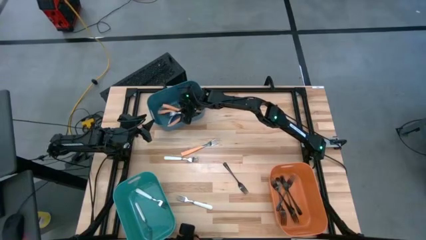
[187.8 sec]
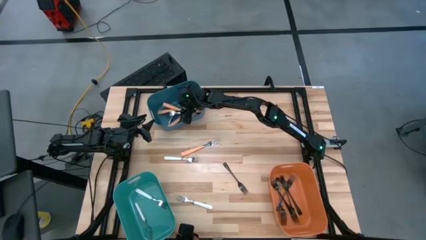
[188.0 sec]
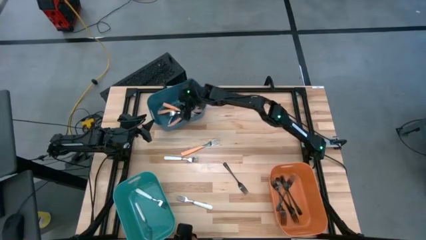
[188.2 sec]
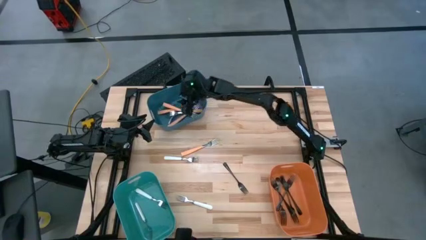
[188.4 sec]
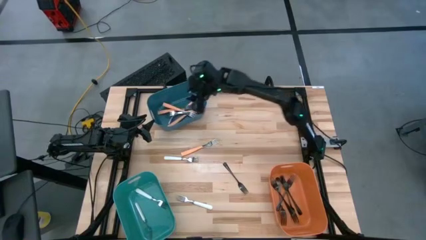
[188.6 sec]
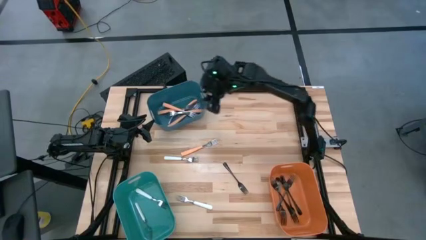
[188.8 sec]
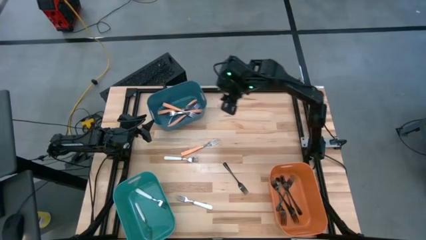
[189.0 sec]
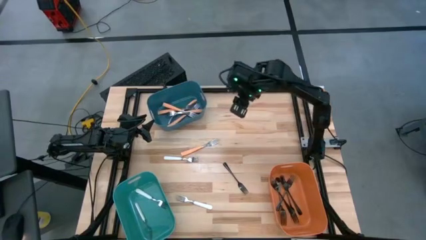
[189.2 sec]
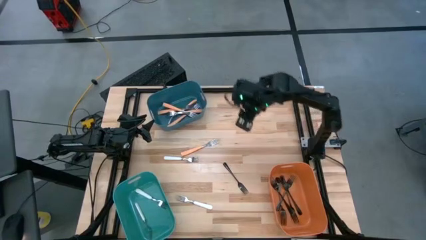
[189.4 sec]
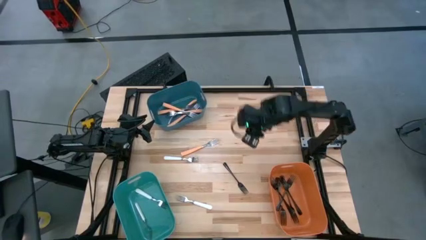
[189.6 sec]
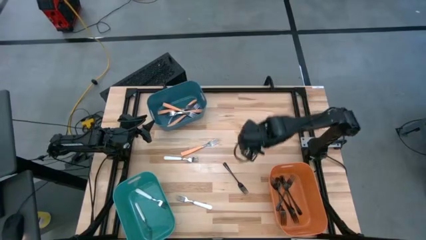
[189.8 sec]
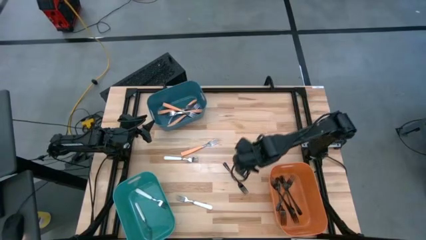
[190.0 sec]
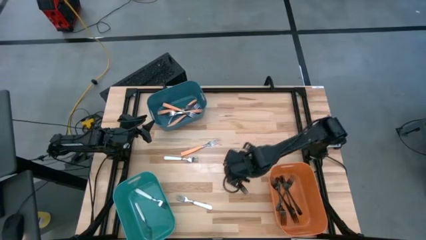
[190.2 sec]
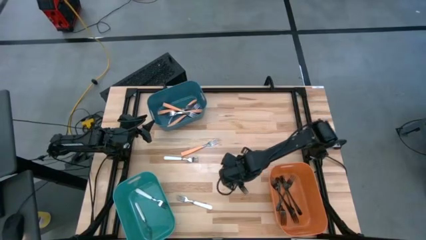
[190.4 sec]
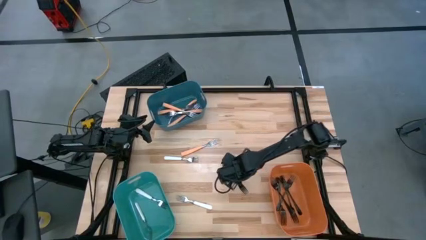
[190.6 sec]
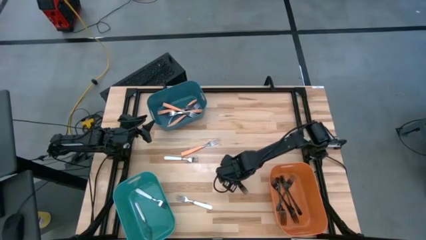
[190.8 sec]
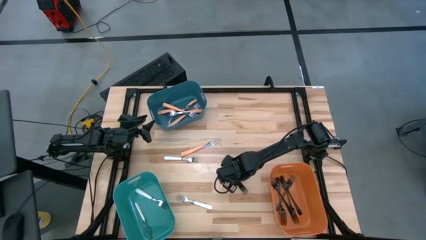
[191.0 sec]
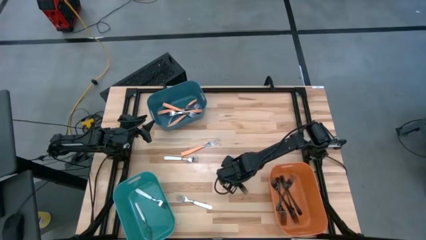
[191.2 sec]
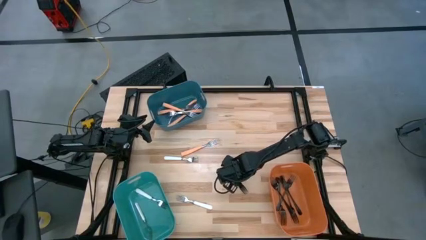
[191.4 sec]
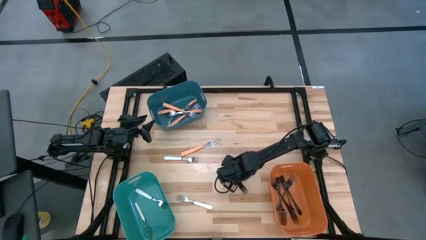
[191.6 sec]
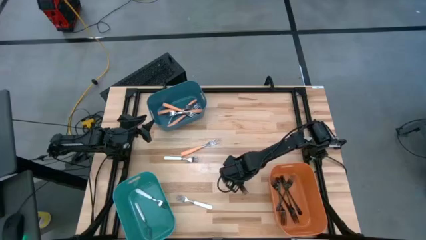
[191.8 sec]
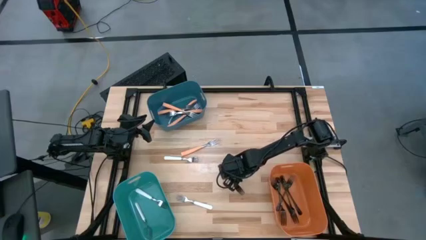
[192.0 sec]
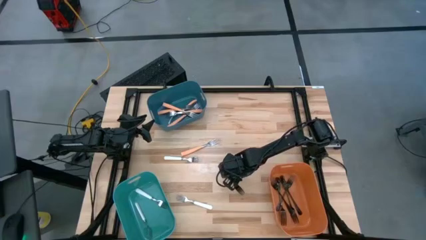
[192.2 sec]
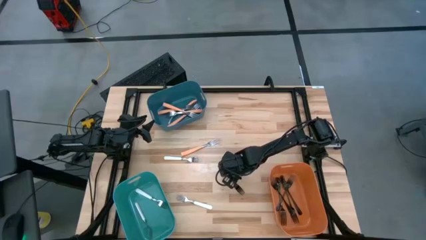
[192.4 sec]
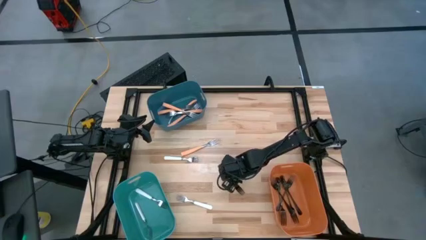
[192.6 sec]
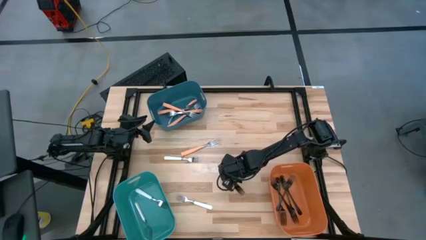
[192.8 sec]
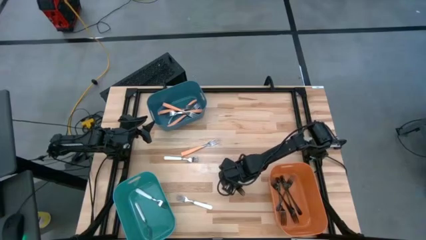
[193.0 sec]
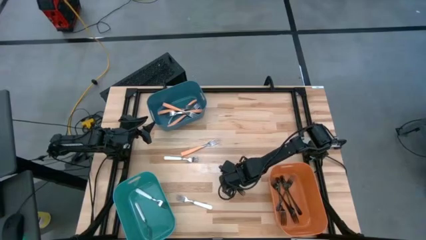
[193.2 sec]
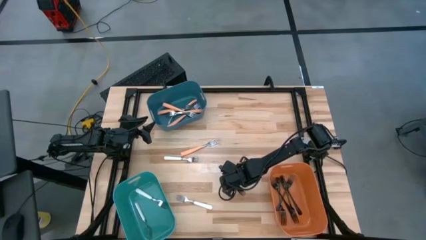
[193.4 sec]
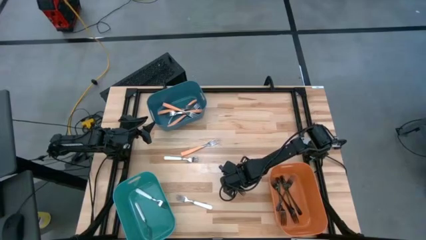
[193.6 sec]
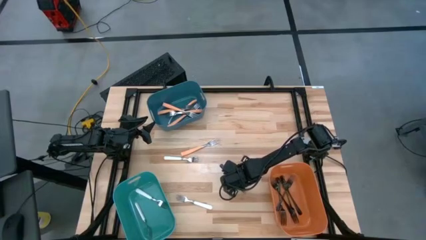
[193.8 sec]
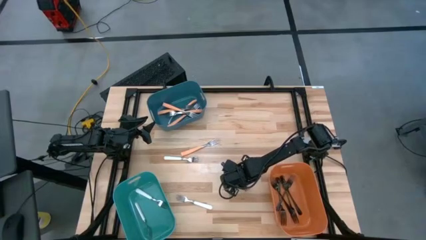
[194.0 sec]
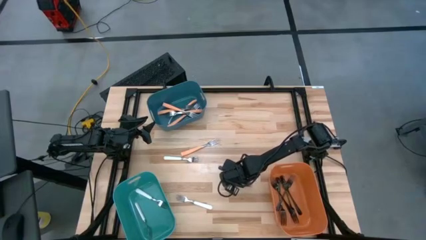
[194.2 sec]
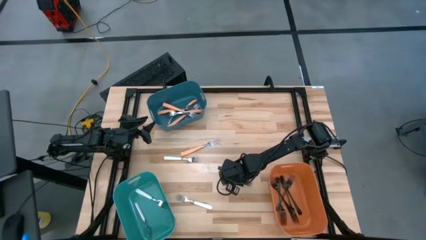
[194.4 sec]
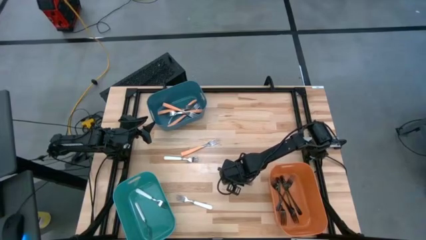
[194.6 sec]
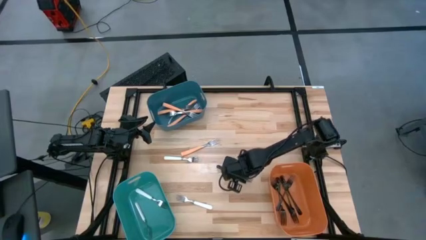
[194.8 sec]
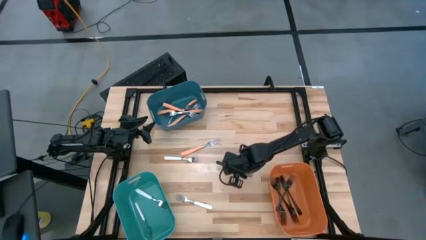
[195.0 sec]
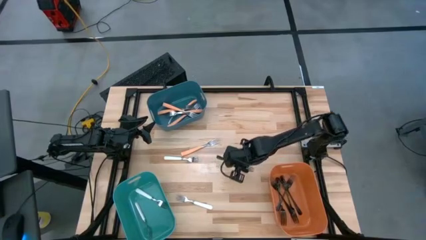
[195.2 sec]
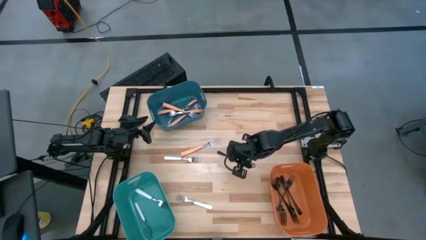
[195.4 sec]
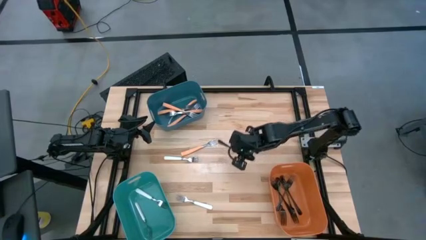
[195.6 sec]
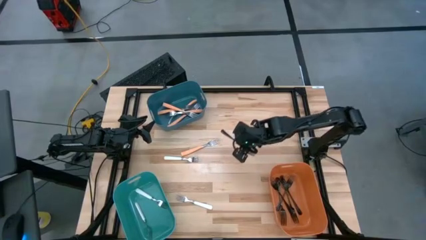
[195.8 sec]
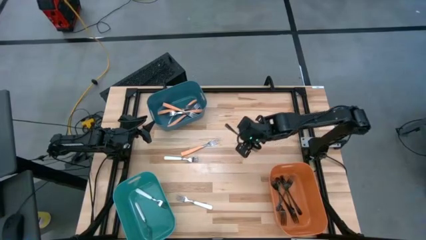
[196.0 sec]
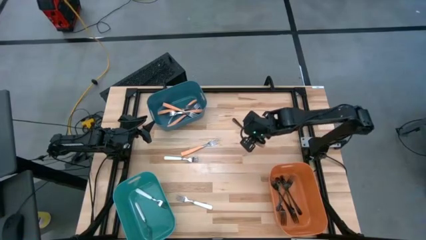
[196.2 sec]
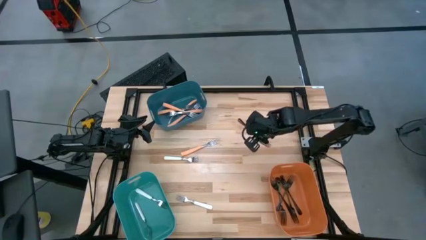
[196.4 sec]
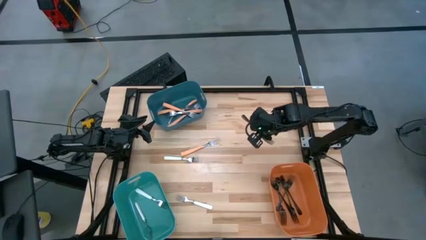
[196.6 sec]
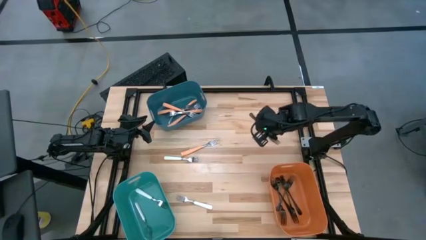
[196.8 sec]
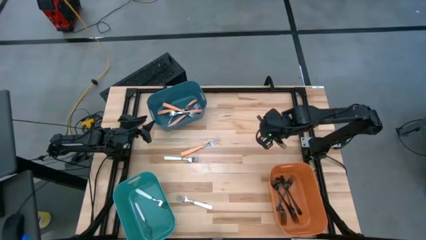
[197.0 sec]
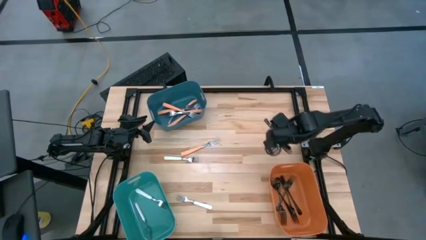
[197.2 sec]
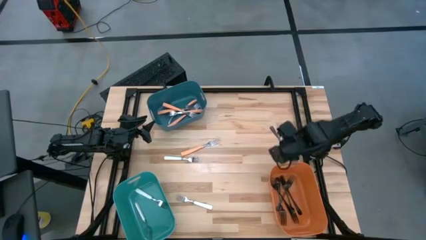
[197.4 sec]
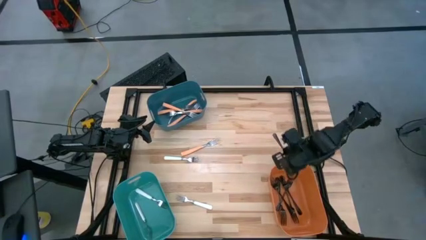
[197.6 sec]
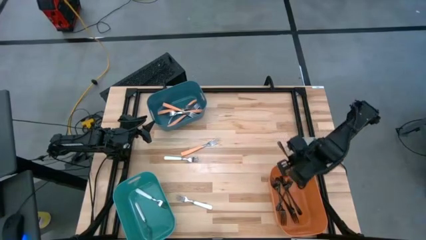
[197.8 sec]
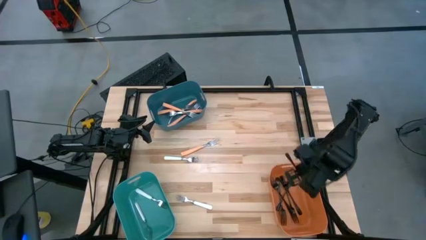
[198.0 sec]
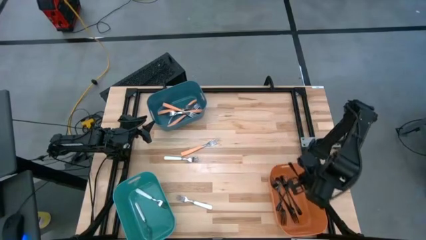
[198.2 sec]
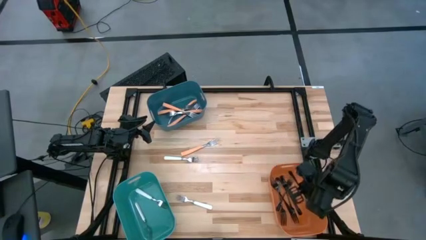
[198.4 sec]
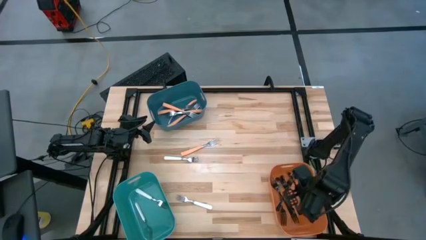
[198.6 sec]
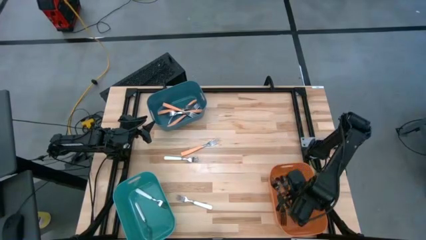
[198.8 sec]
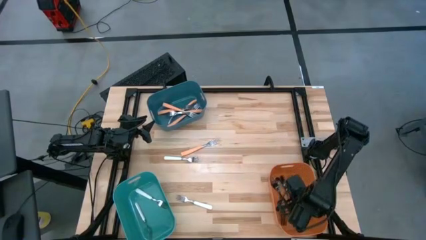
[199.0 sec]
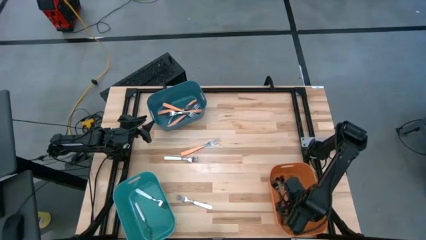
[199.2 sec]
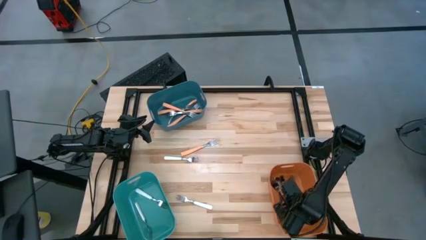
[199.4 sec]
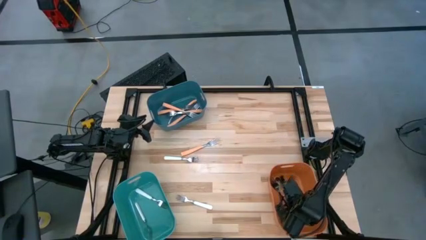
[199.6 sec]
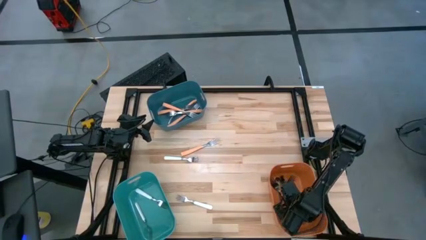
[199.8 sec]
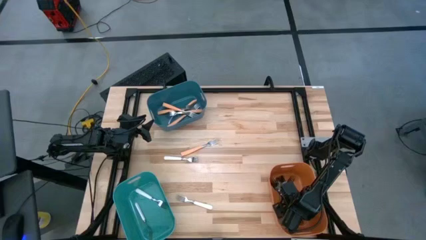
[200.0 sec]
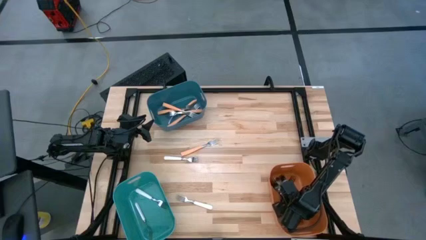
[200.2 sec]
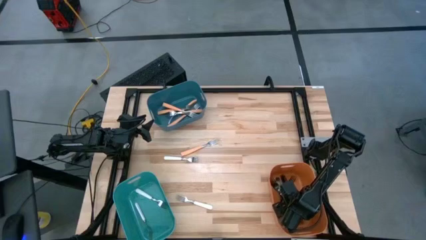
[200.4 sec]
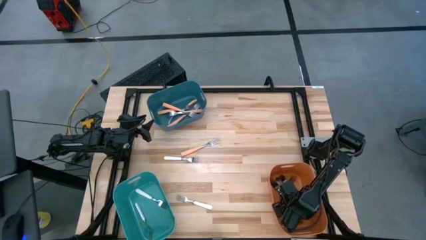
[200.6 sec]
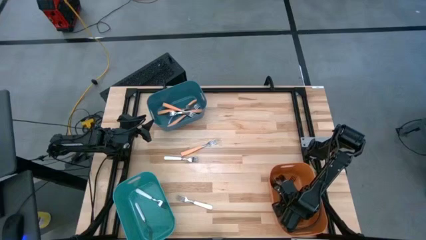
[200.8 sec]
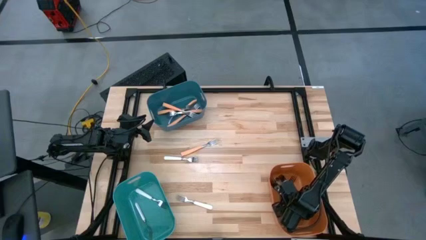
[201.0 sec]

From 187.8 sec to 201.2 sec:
Task: Sort silverware by color (type)
Put the black fork into the orange bin
